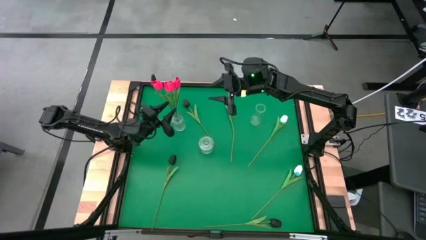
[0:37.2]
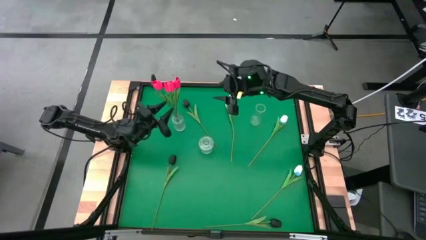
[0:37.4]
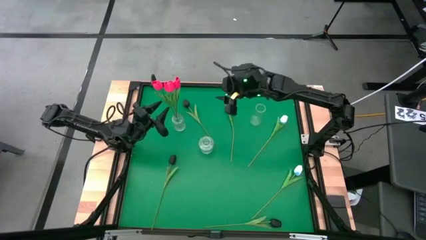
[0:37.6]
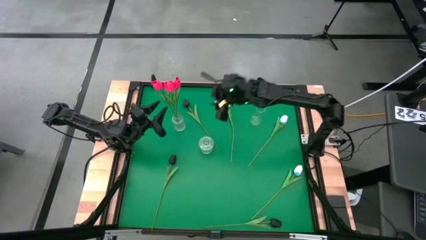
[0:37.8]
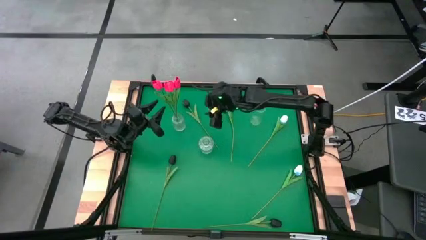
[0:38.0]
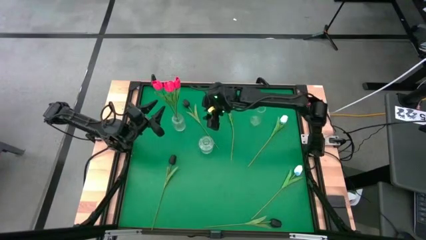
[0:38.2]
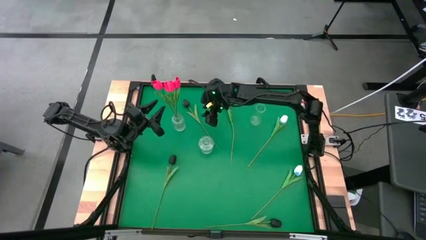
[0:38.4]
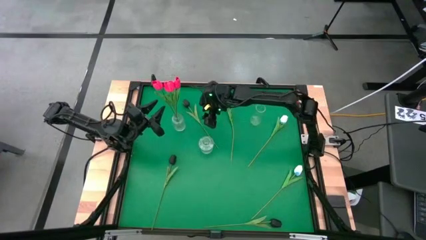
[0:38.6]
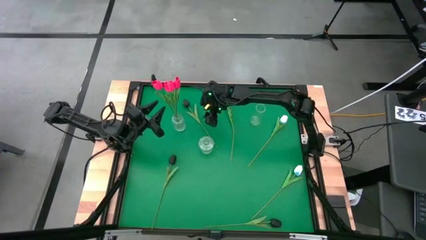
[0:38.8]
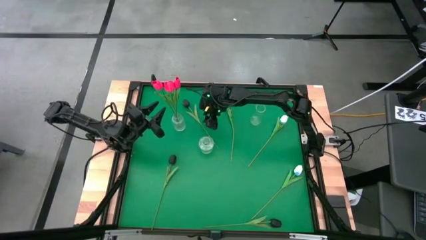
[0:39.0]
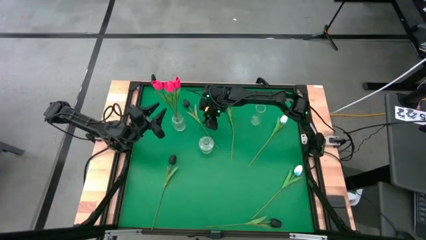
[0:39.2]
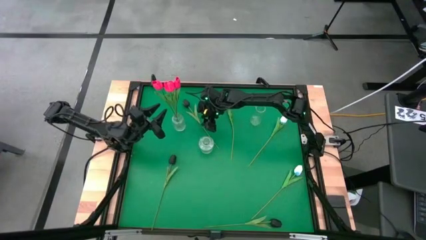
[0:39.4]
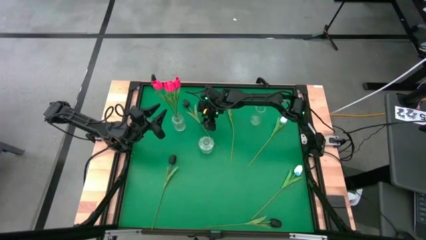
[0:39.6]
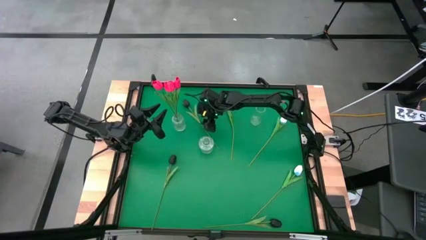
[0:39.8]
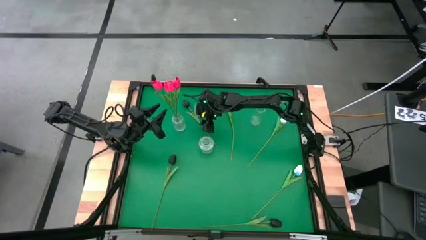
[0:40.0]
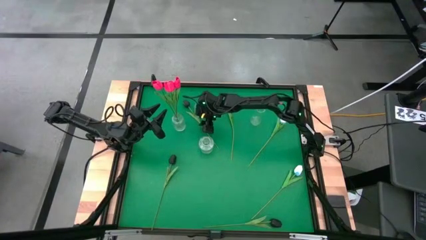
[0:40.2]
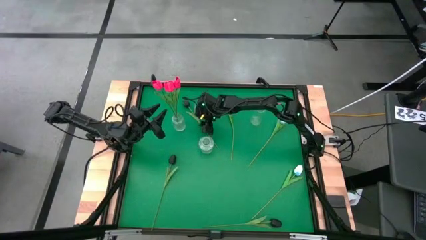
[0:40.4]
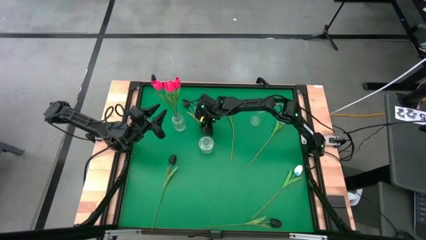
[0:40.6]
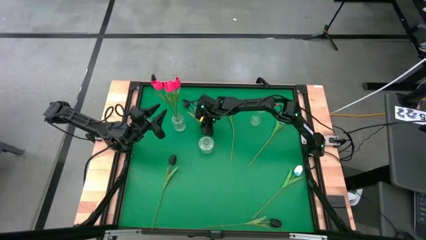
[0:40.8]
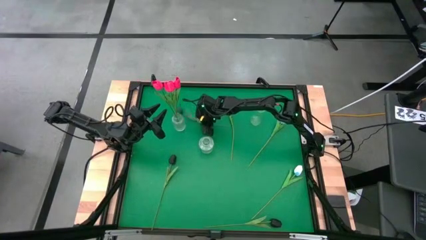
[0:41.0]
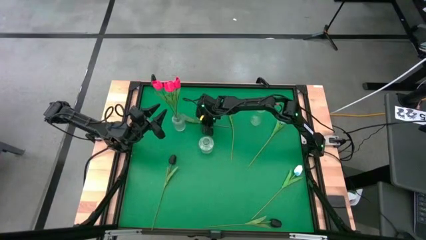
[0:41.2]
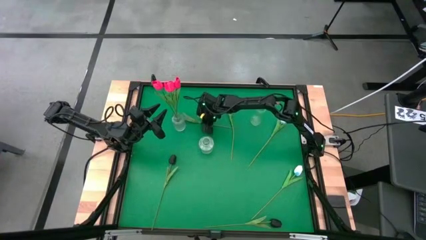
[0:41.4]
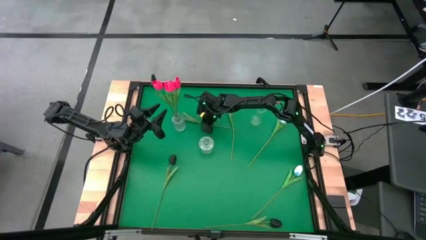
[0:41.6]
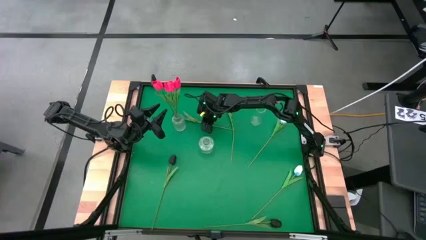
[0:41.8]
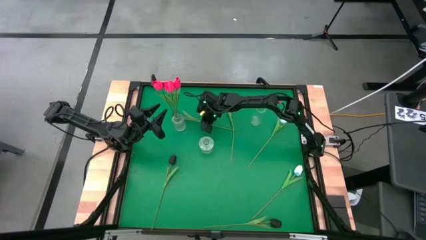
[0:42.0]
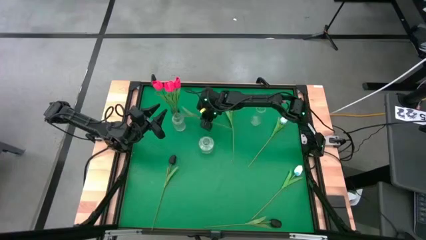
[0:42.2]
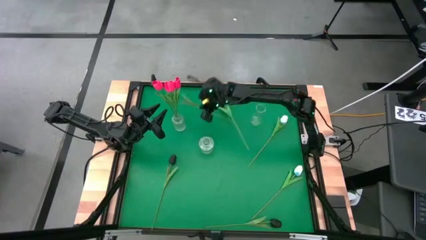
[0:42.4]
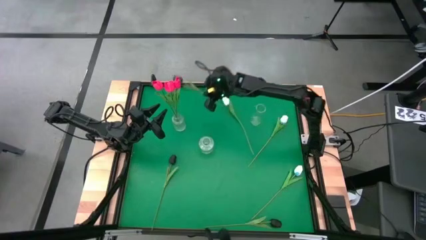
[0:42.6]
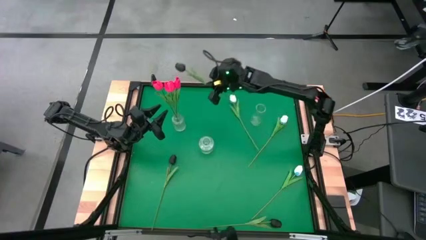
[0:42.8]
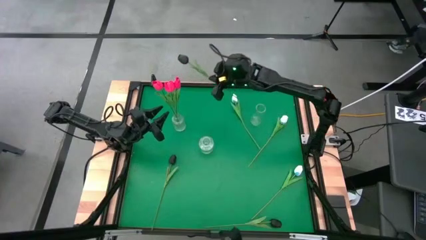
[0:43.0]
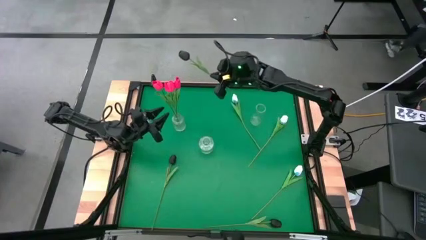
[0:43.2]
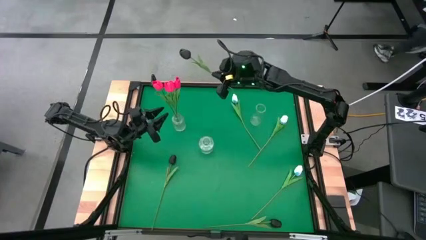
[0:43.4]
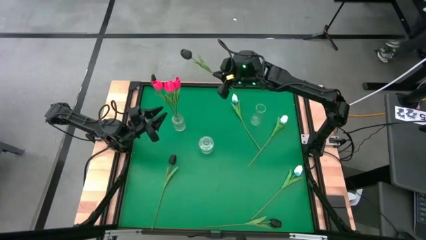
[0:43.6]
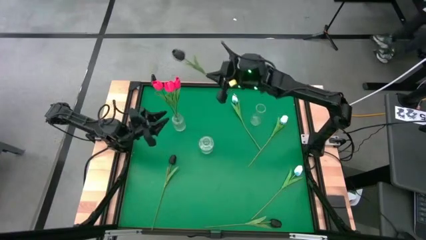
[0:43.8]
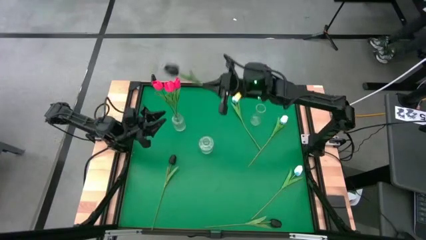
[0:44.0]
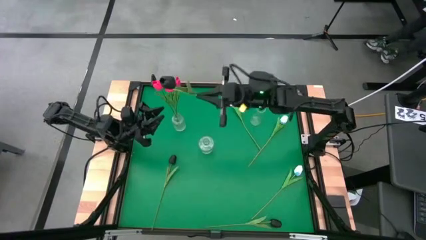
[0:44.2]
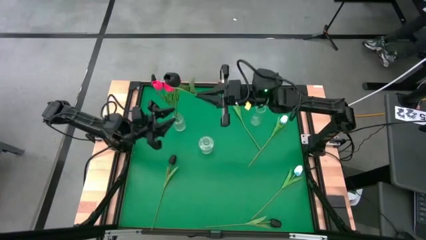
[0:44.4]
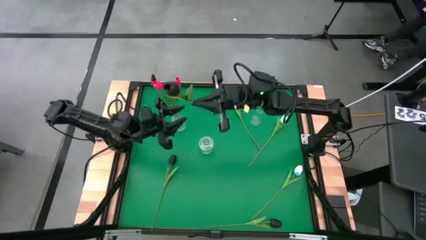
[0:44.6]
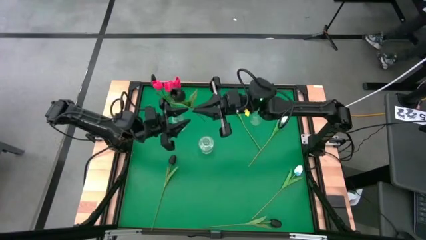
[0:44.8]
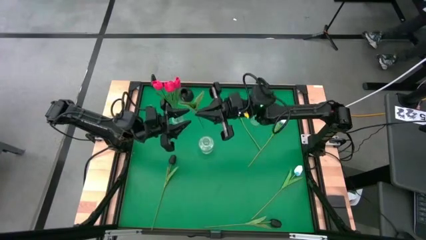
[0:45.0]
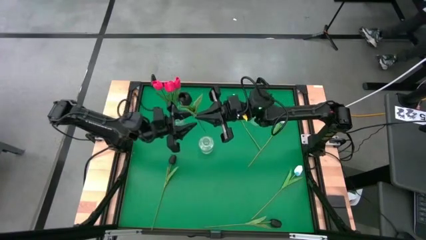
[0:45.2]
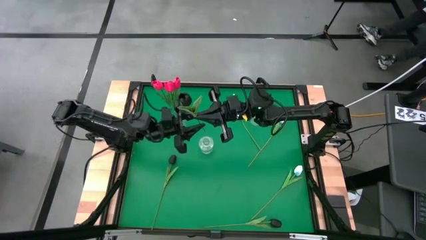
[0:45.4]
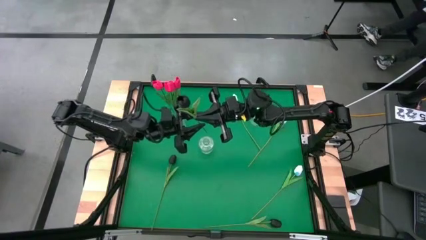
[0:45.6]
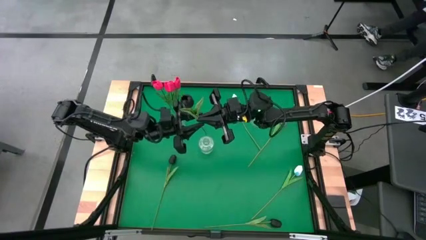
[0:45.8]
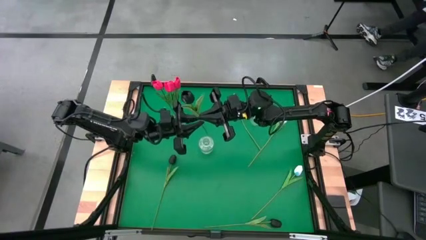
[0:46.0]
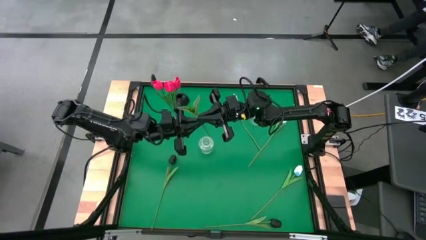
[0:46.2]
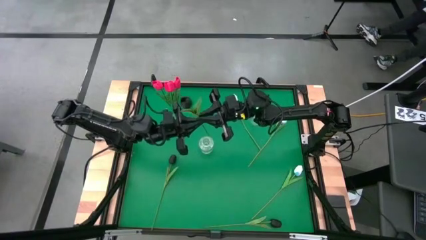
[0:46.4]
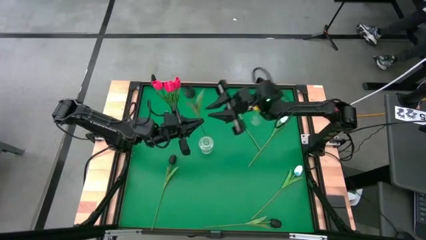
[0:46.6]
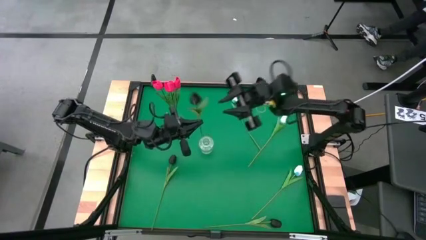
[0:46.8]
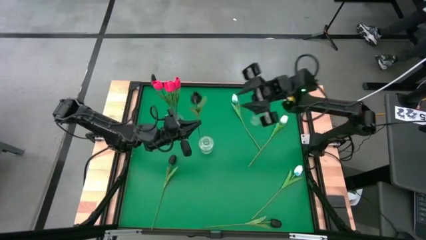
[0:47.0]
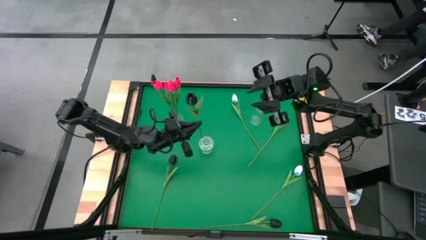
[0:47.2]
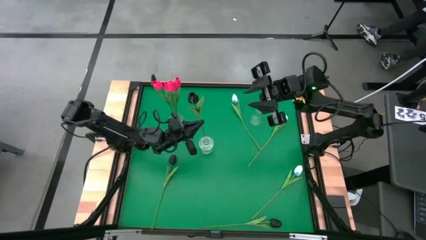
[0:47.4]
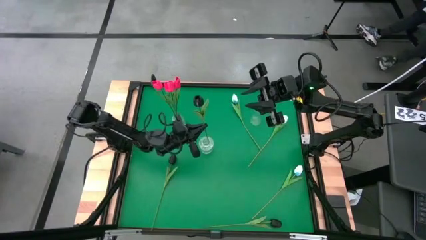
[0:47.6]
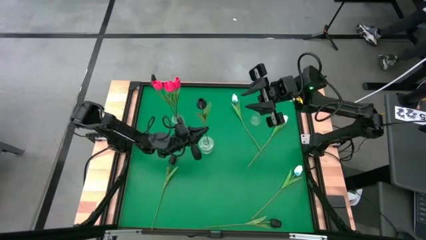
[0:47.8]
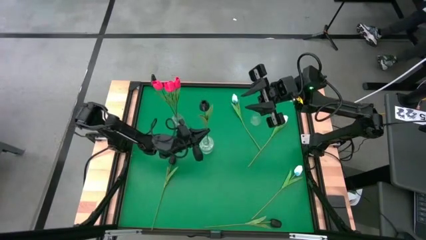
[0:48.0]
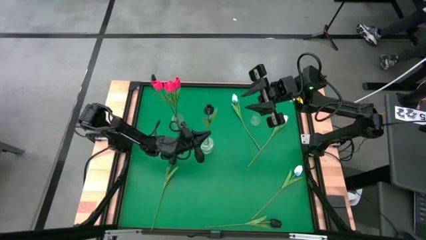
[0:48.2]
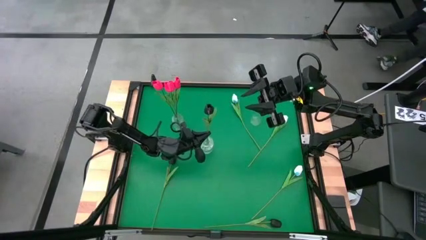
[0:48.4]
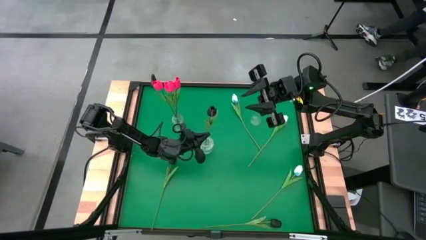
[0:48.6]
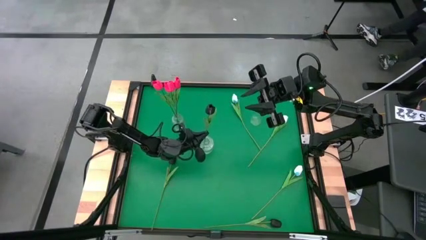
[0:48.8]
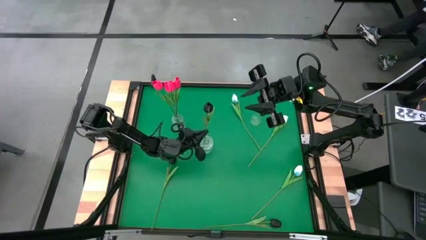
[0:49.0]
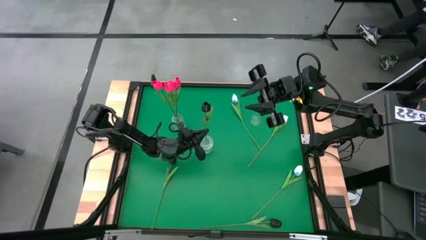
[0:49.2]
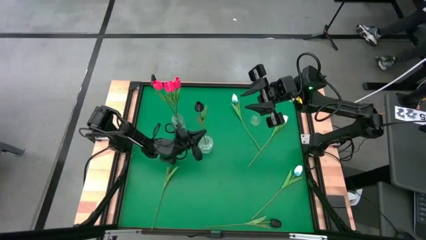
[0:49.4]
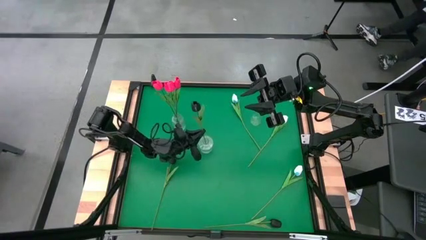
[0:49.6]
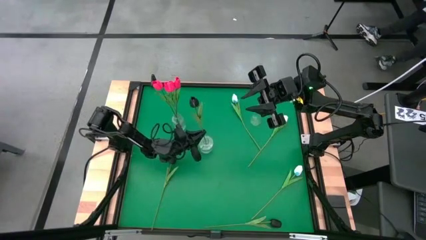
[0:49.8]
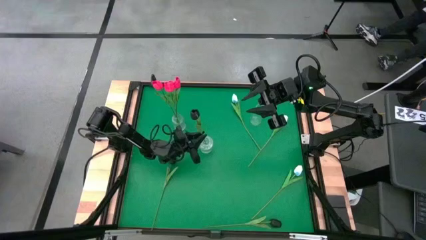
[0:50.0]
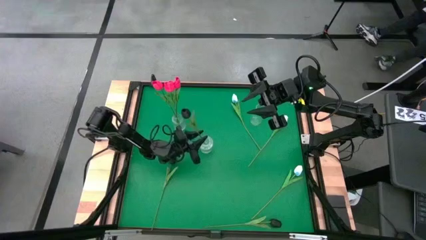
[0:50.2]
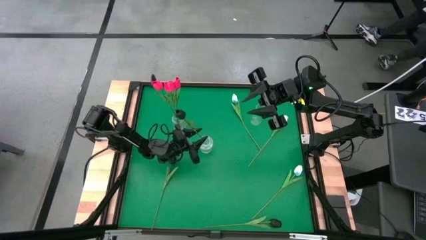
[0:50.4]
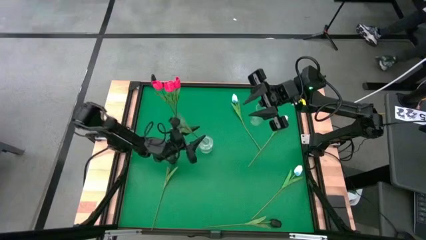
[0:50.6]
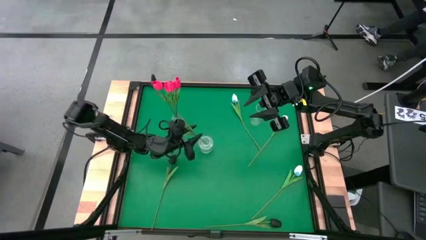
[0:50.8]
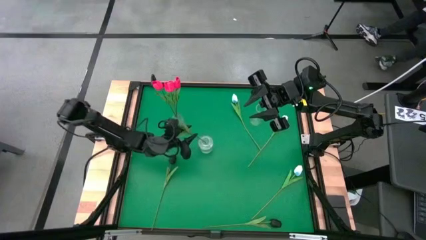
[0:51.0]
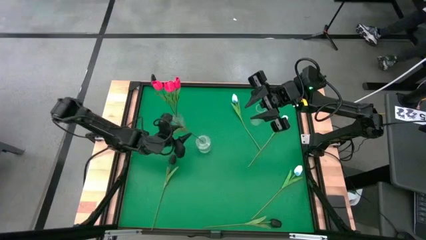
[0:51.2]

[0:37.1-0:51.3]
Task: Sort flowers into vase by color
Put the top black tulip into the middle transparent vase
